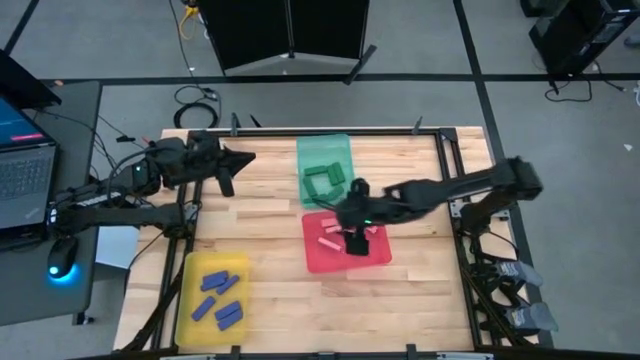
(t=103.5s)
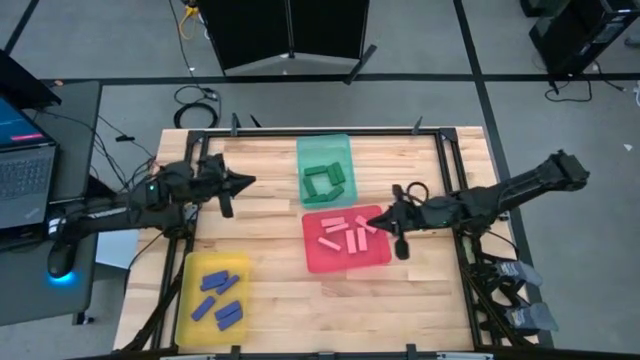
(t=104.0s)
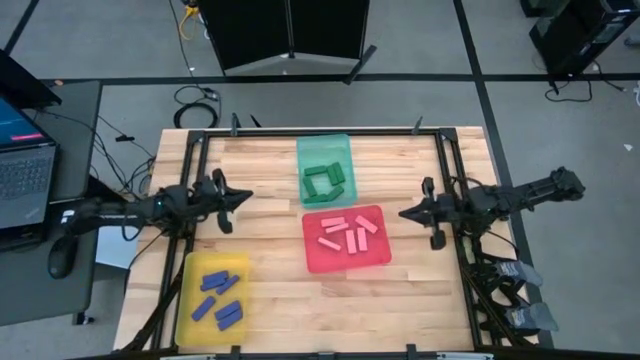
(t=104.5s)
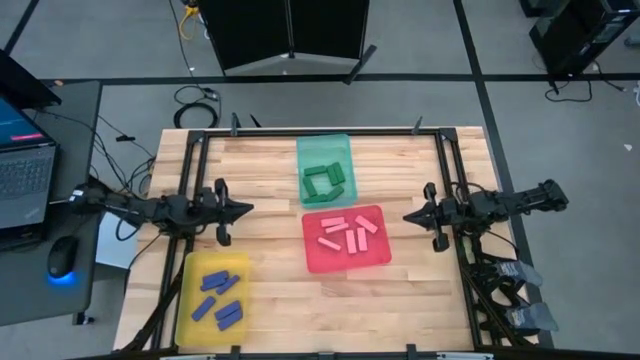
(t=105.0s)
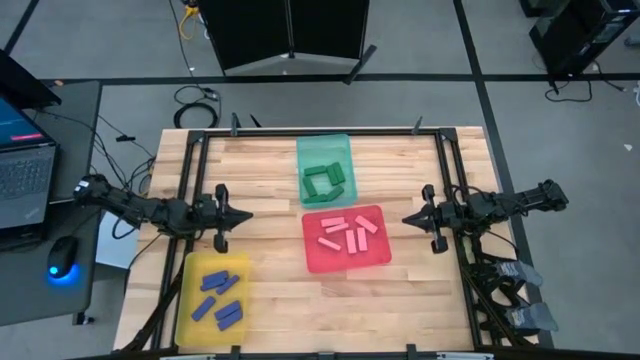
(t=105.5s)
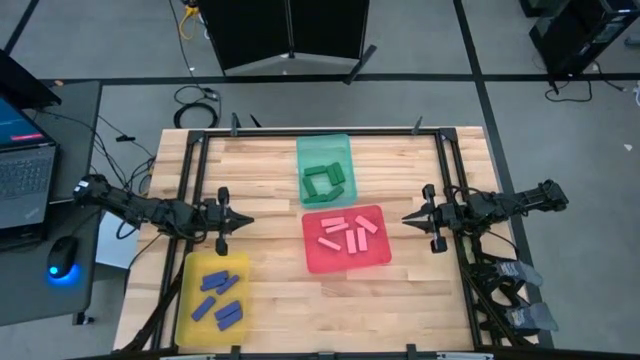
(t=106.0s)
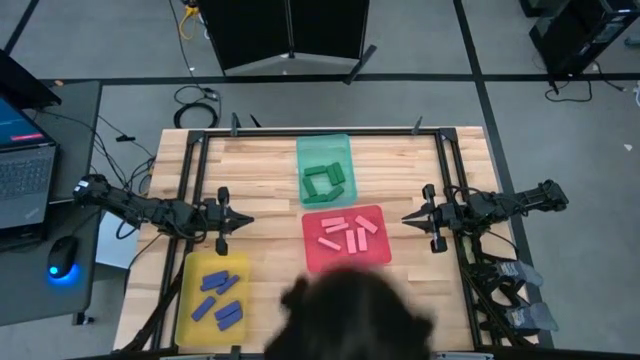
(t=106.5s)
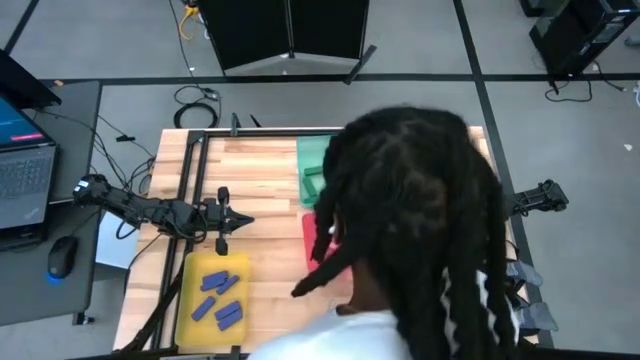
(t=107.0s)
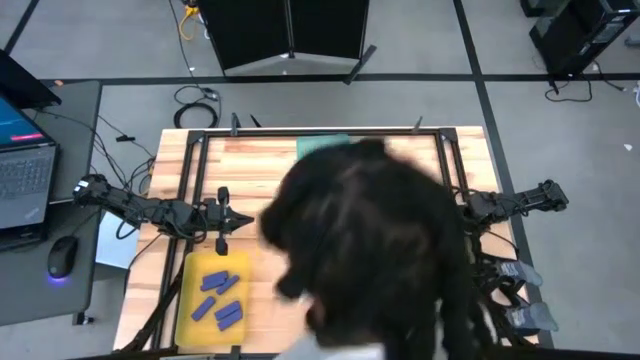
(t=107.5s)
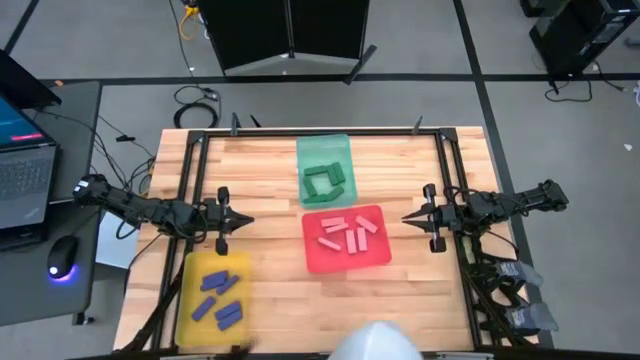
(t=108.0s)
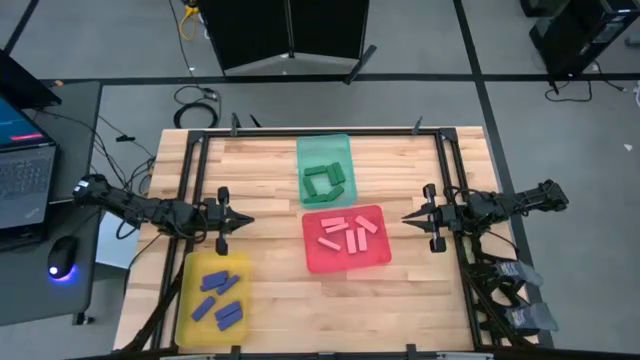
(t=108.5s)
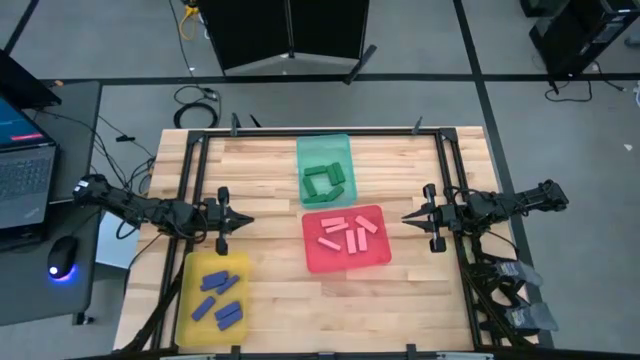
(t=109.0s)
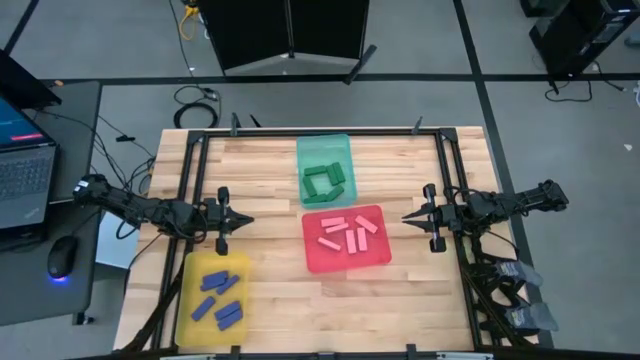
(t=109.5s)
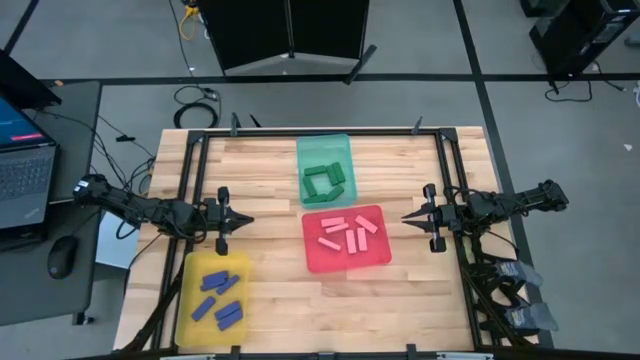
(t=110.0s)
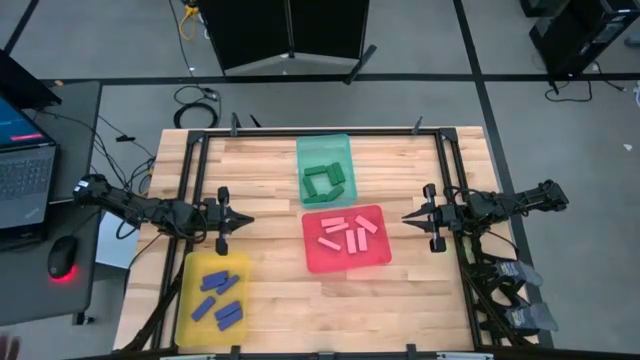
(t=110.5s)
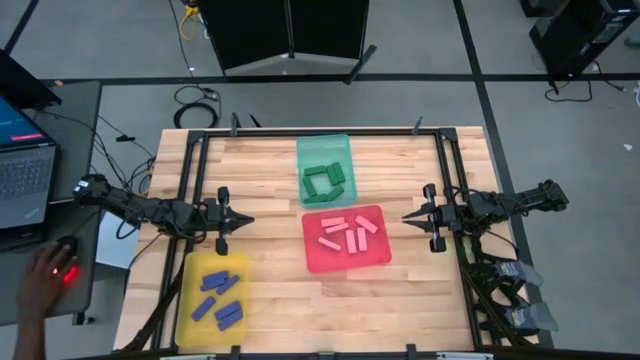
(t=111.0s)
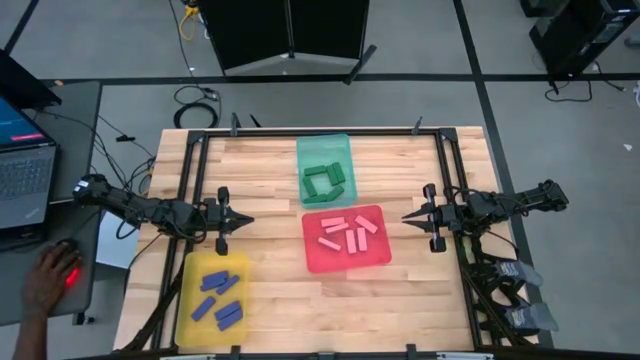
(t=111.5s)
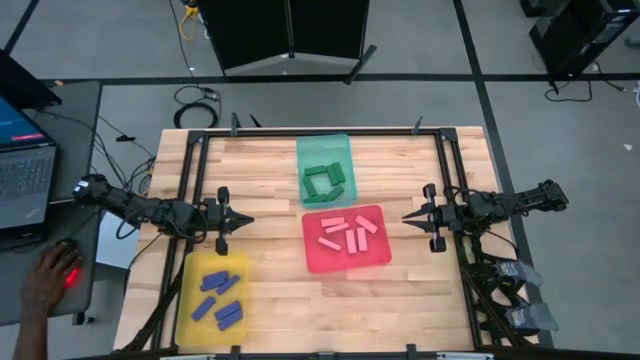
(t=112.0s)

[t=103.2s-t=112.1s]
Task: Sort blocks
Return to Home Position
